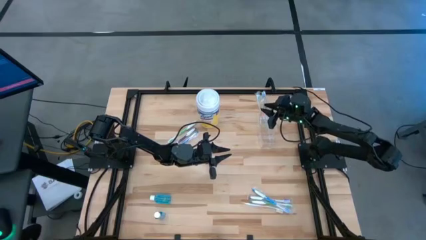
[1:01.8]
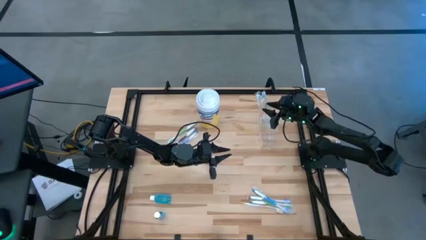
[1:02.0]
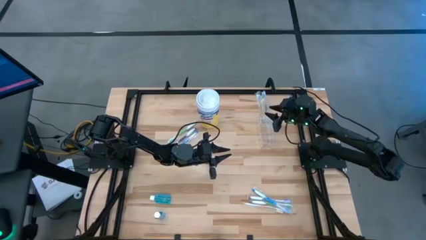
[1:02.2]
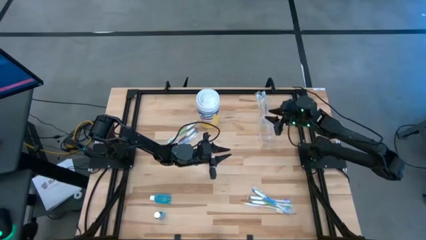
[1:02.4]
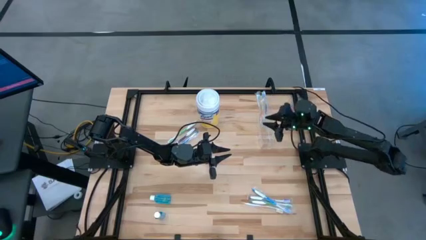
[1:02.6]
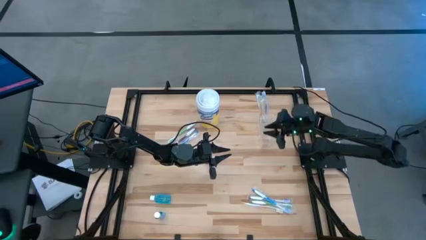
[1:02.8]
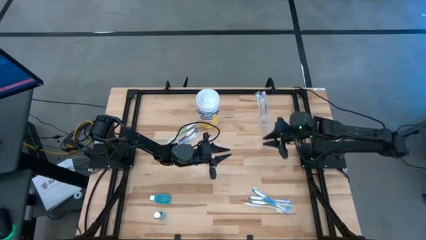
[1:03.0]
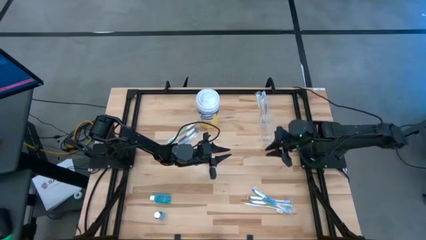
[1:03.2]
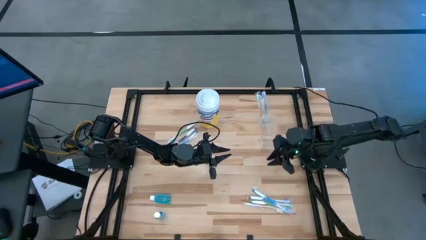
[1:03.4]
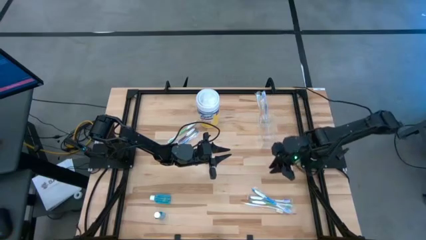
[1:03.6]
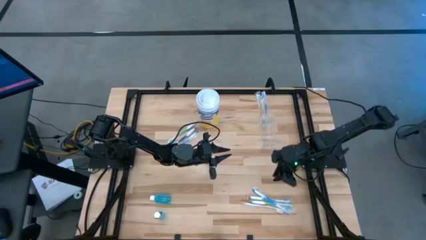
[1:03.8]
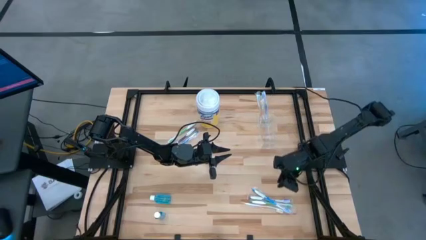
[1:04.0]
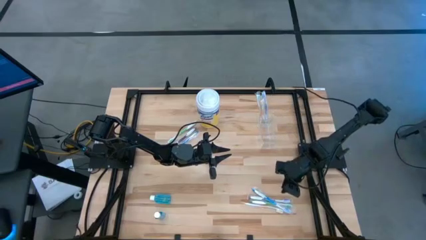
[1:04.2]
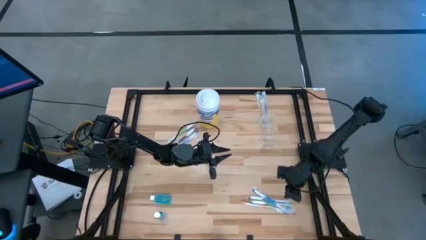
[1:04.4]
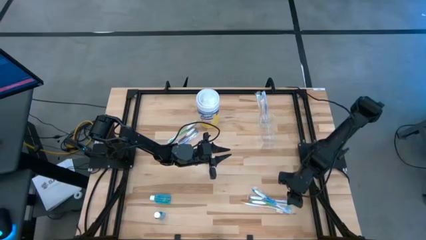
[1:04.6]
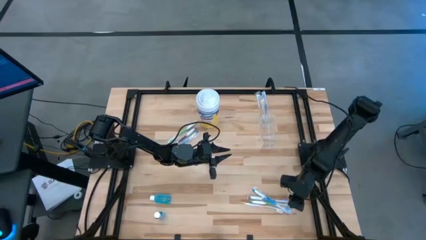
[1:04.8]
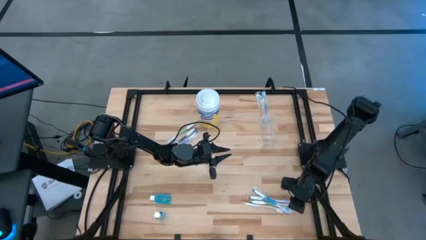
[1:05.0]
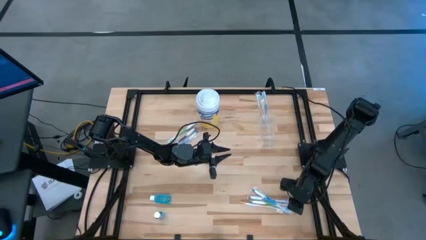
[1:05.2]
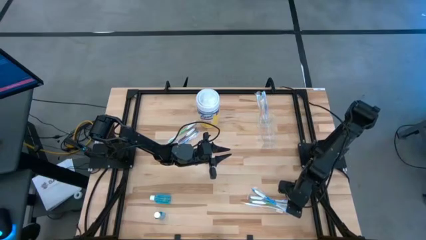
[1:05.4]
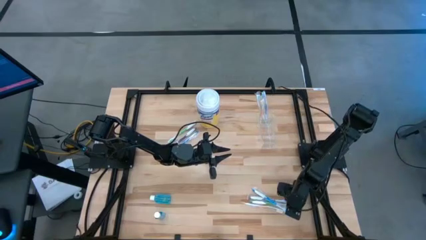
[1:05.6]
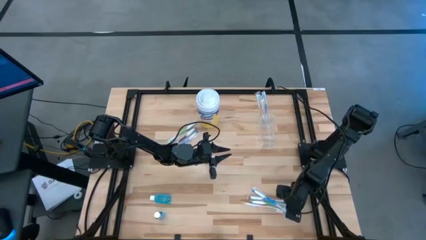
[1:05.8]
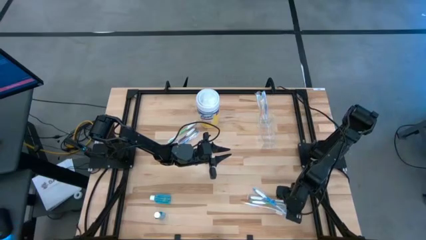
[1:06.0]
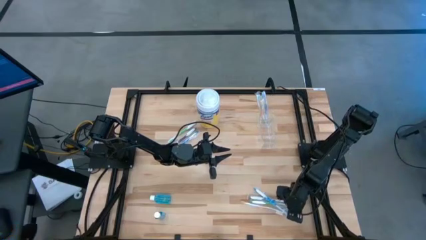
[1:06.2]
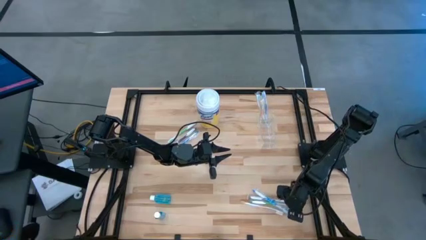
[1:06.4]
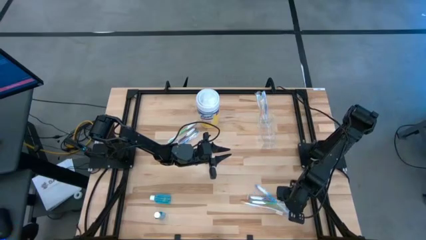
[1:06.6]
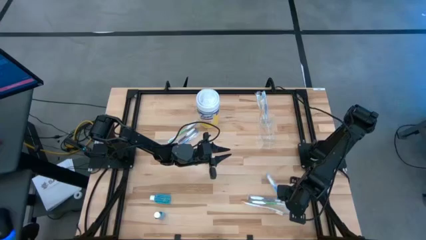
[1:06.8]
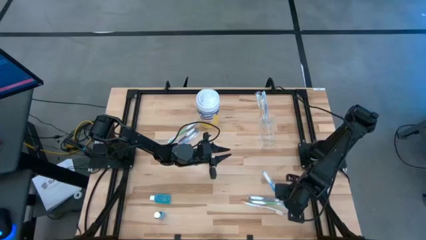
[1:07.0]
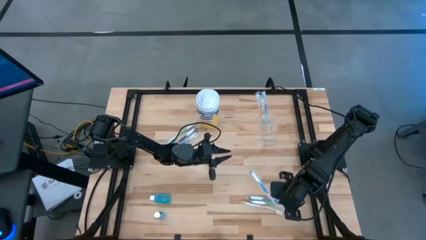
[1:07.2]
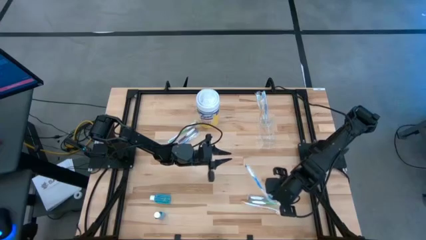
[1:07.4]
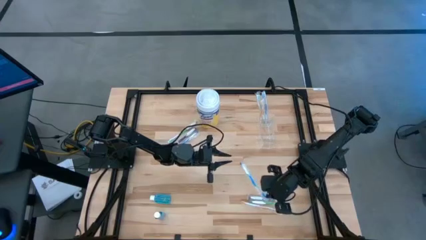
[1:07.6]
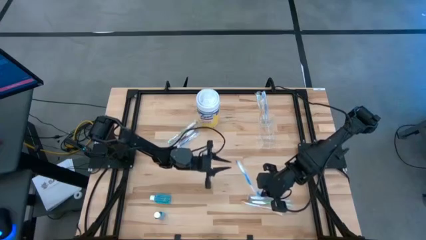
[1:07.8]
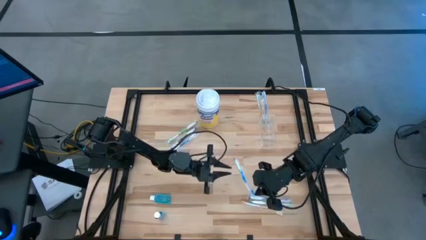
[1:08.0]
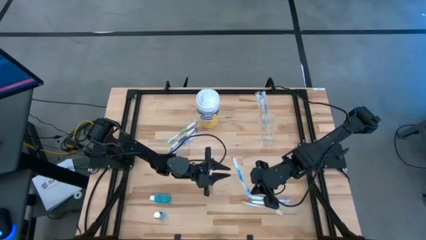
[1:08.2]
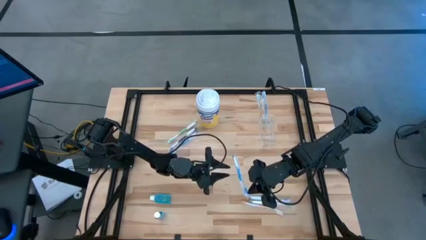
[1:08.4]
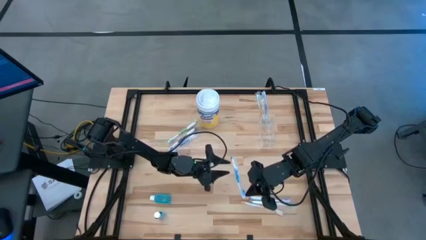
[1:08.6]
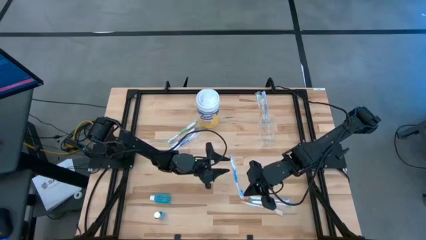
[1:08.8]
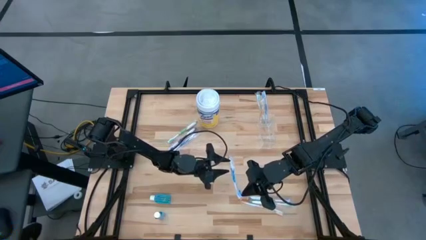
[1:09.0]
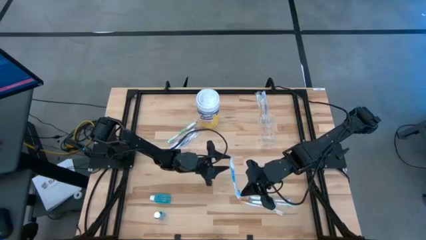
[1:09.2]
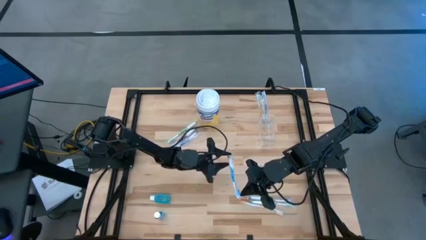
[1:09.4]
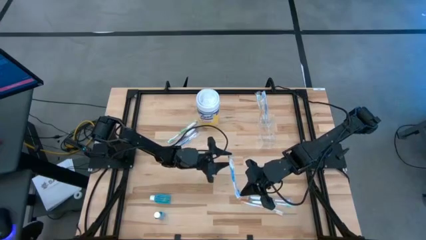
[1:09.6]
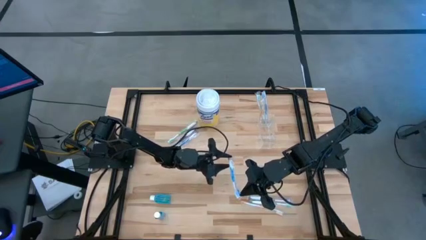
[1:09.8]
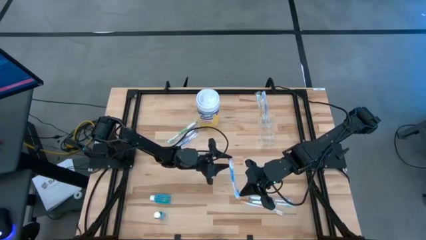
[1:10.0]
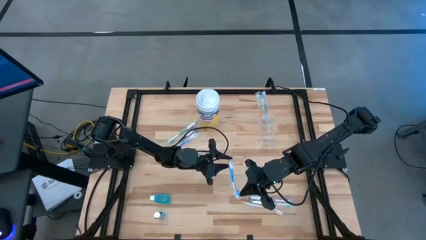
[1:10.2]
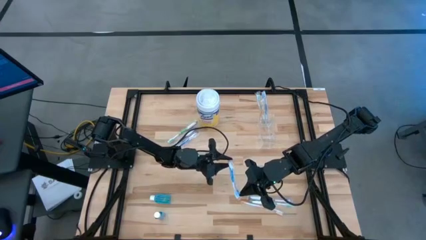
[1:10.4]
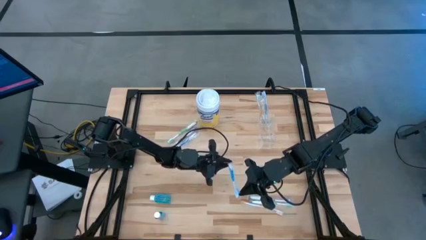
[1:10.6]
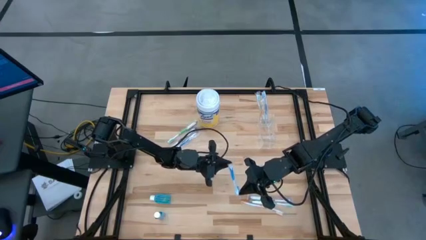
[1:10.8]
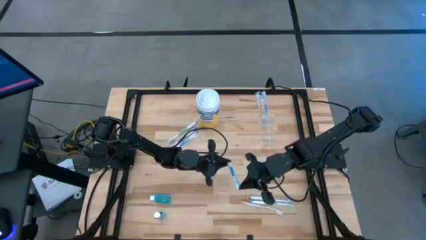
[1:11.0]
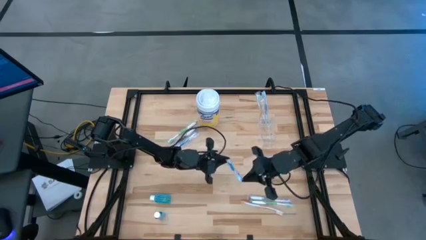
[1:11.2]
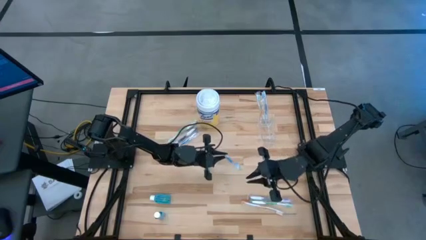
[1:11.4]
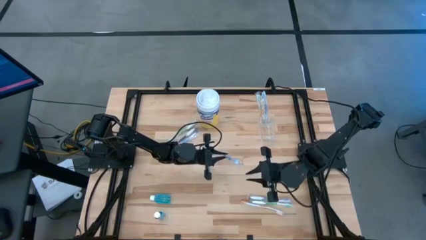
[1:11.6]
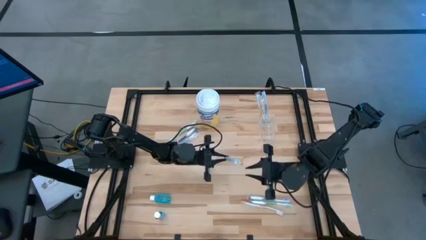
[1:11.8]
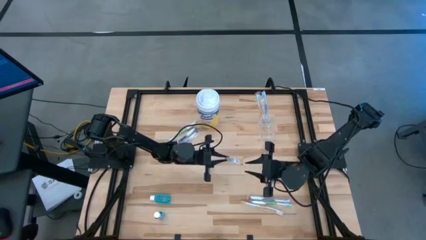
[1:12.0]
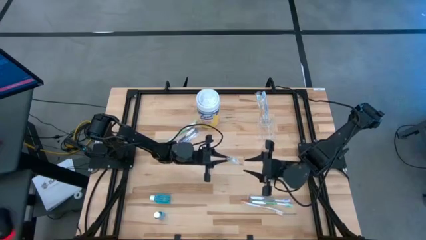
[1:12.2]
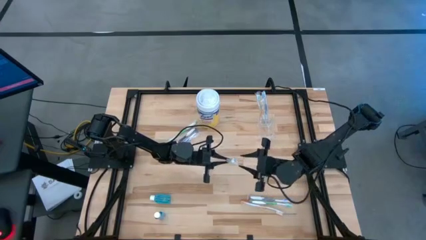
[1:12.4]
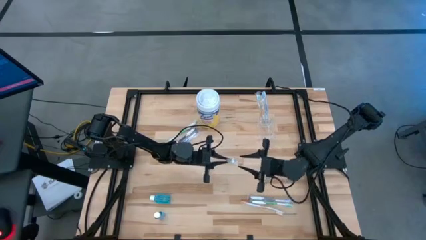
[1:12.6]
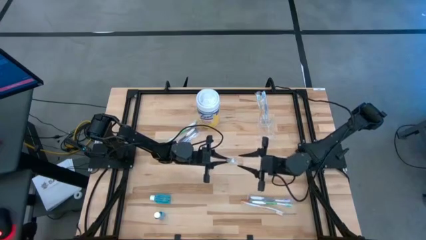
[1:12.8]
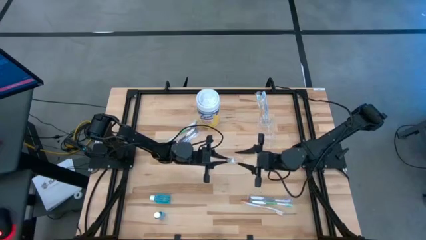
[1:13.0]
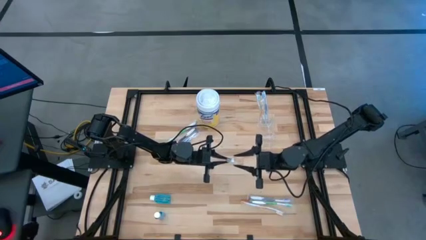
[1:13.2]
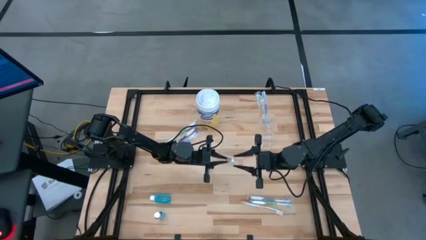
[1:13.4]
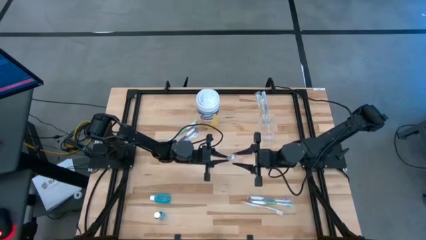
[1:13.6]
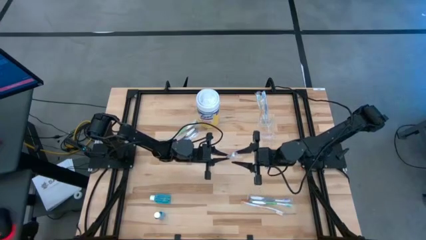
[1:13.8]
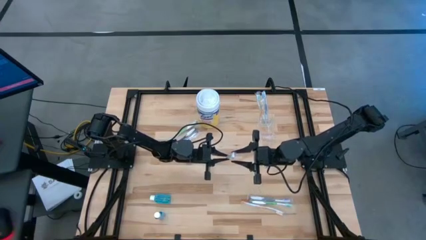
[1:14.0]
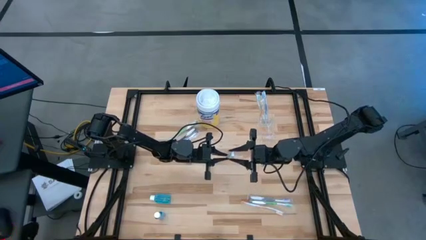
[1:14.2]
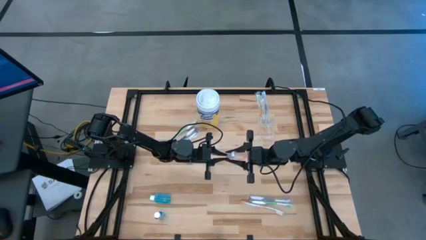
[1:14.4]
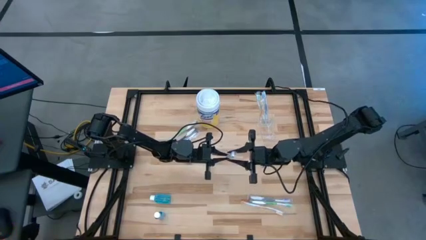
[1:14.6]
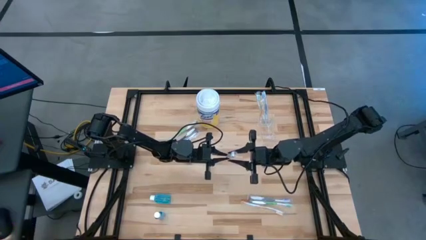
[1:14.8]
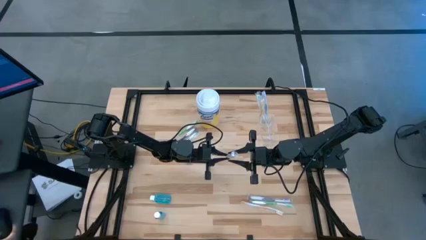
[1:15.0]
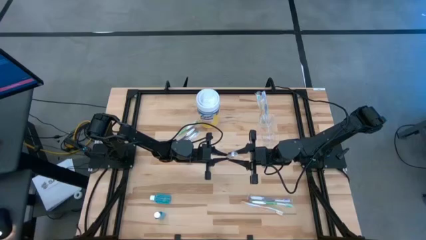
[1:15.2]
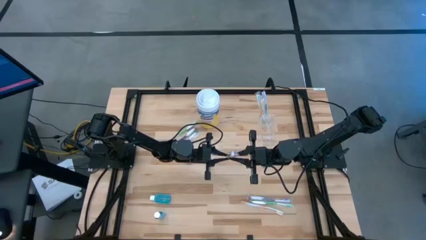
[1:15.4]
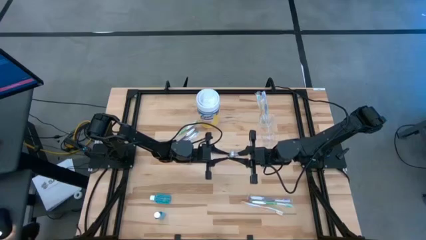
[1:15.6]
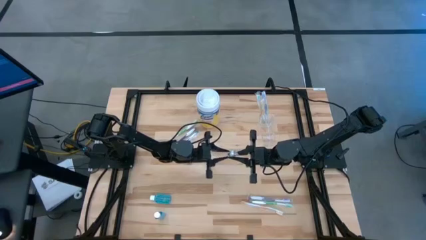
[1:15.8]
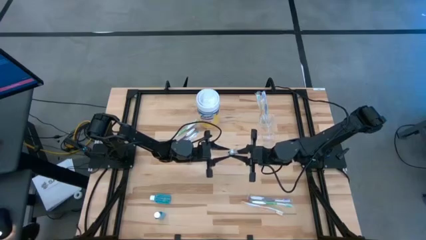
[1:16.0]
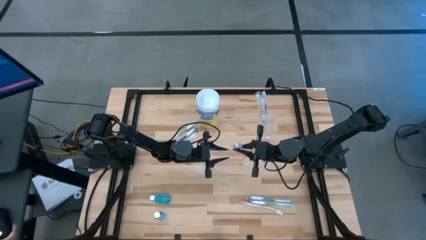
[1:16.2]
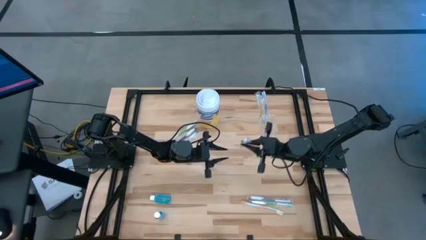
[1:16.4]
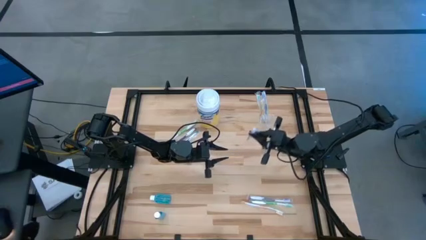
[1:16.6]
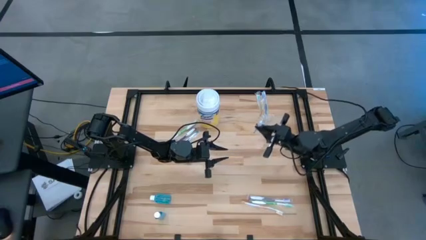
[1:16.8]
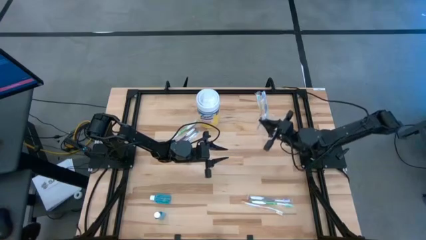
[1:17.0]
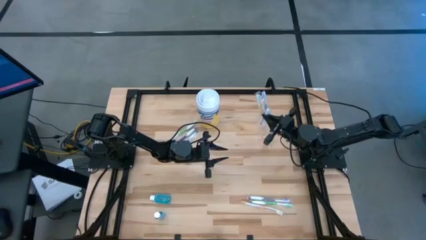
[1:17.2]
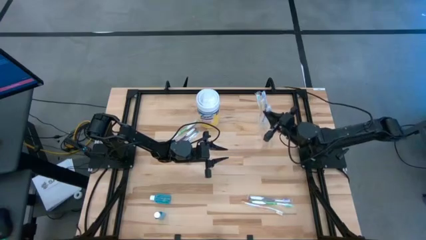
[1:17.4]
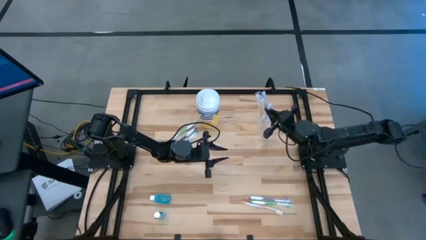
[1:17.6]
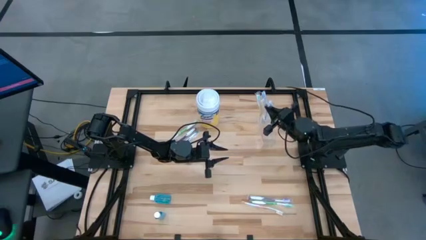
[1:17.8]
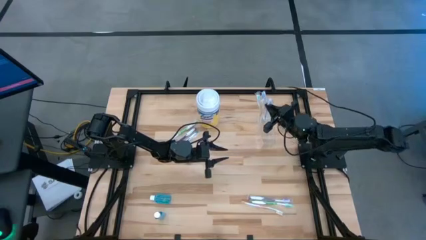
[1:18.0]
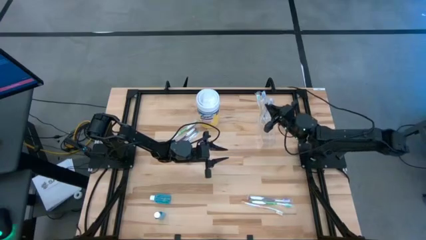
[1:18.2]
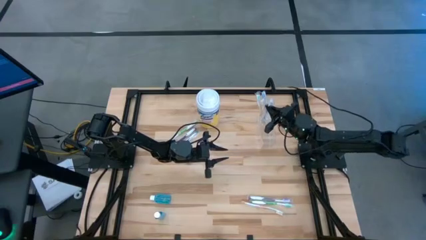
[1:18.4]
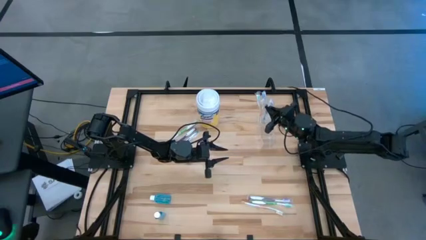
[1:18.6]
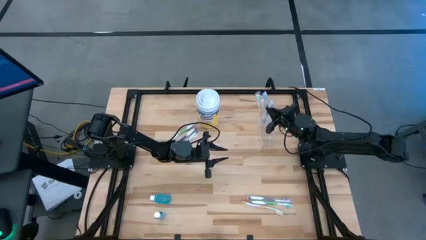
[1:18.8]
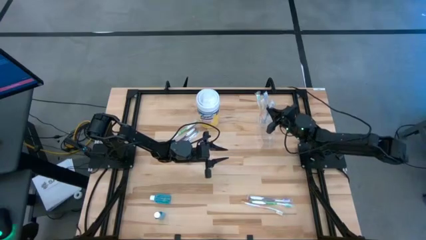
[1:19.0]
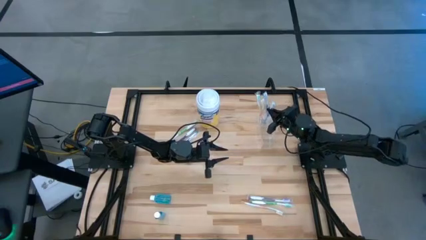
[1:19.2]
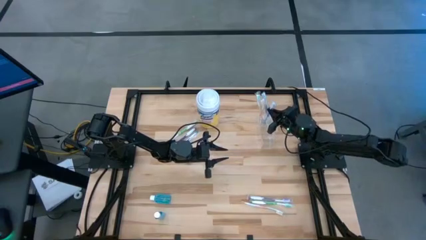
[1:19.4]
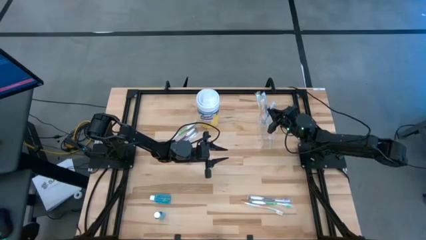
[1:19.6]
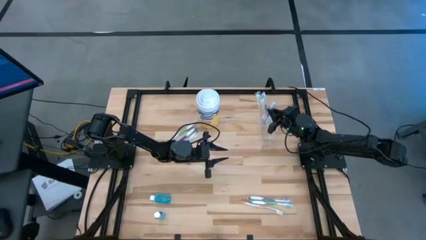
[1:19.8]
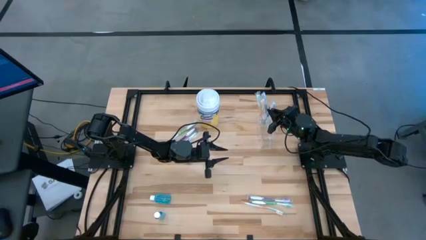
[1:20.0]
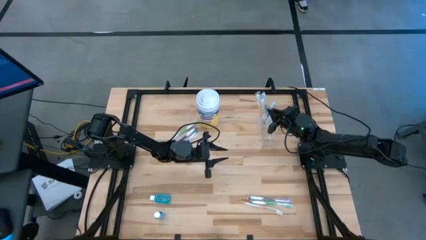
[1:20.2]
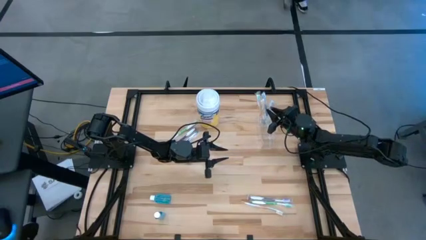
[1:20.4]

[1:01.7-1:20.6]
Task: Pick & Place toothbrushing station
Put the bottom blue toothbrush into the transparent organizer
